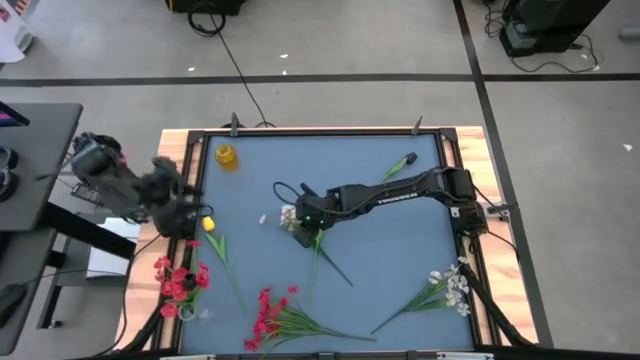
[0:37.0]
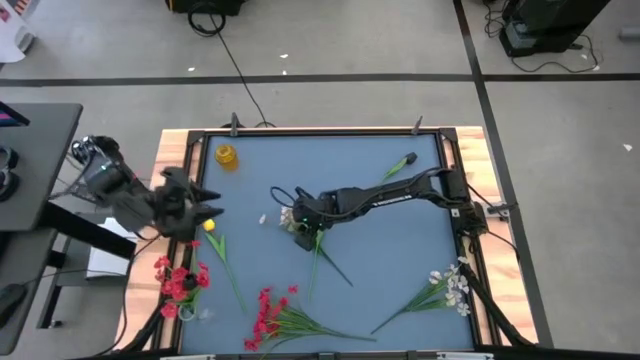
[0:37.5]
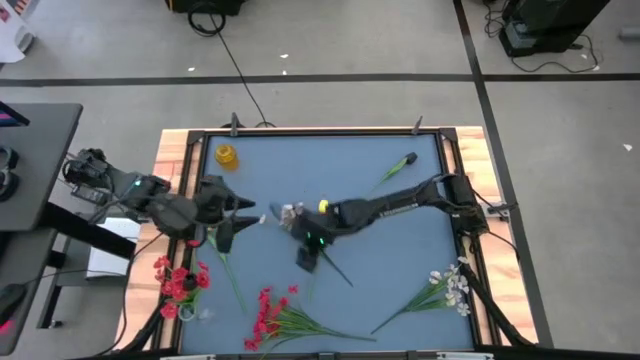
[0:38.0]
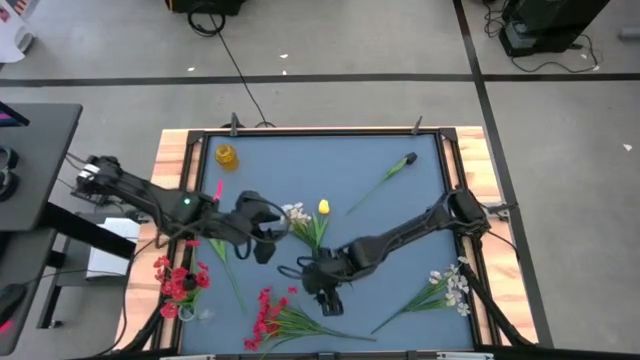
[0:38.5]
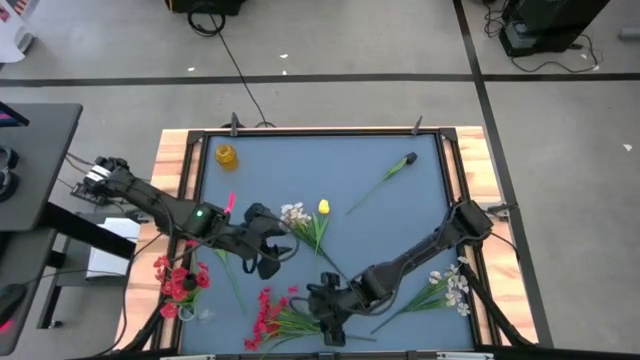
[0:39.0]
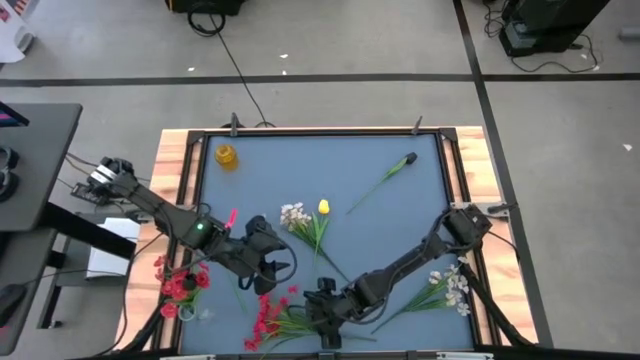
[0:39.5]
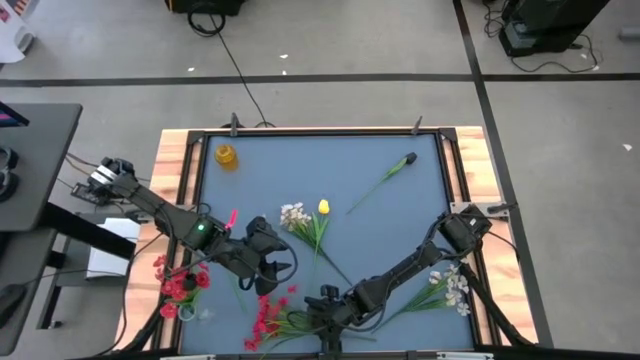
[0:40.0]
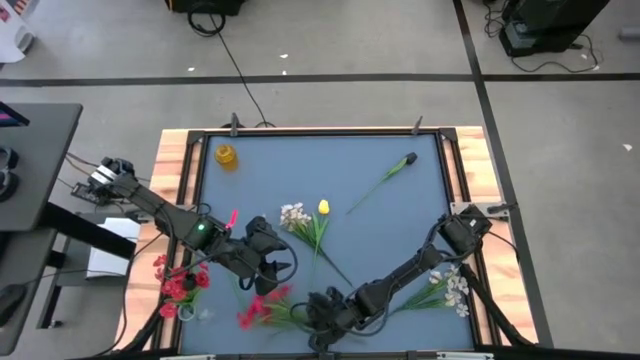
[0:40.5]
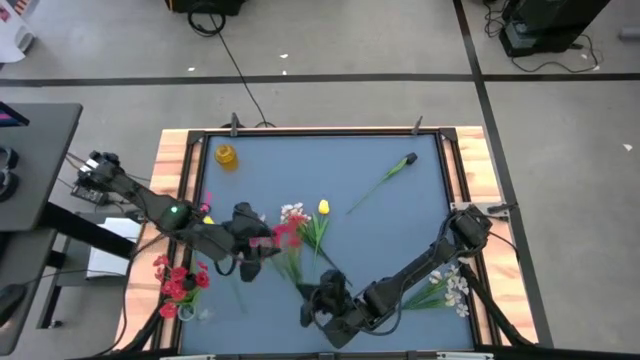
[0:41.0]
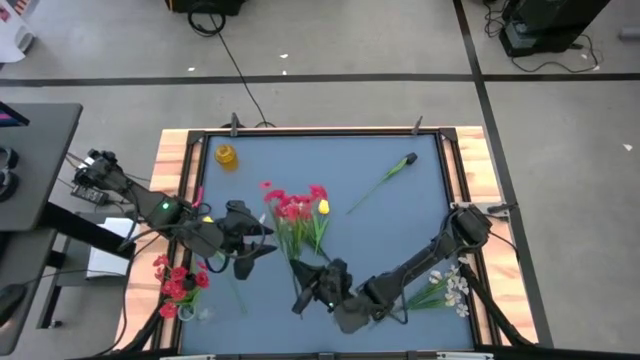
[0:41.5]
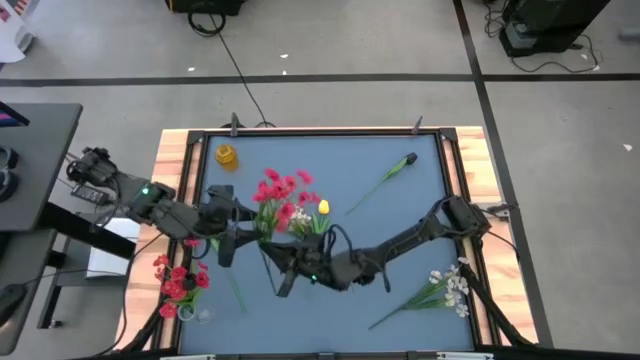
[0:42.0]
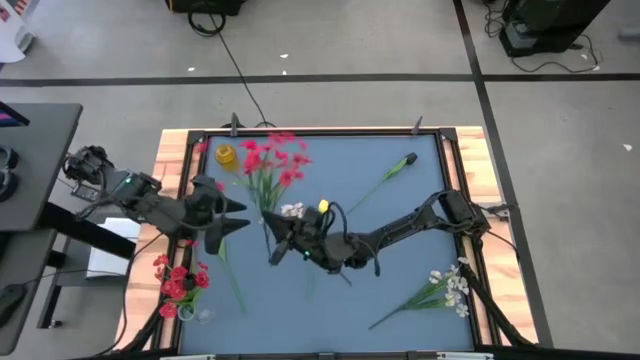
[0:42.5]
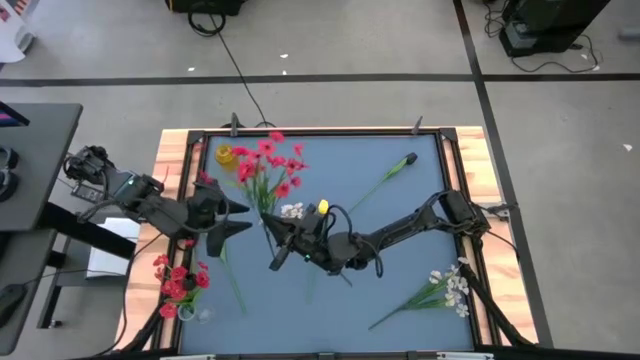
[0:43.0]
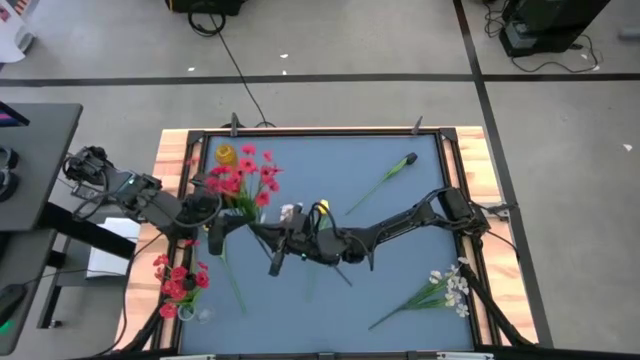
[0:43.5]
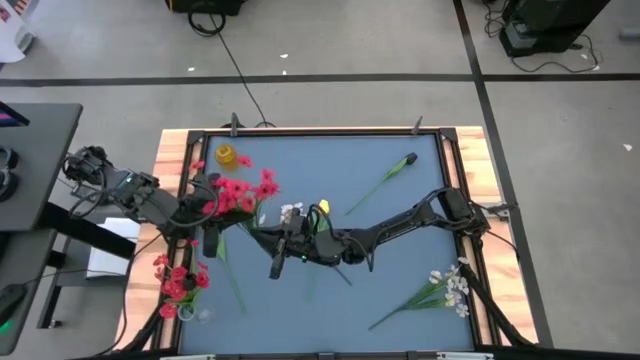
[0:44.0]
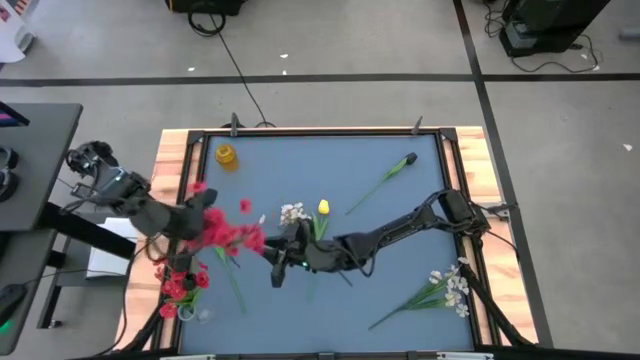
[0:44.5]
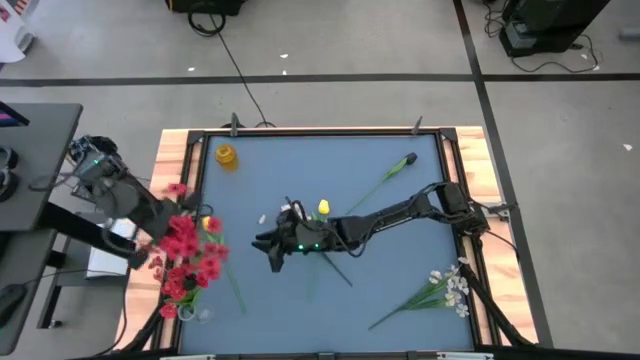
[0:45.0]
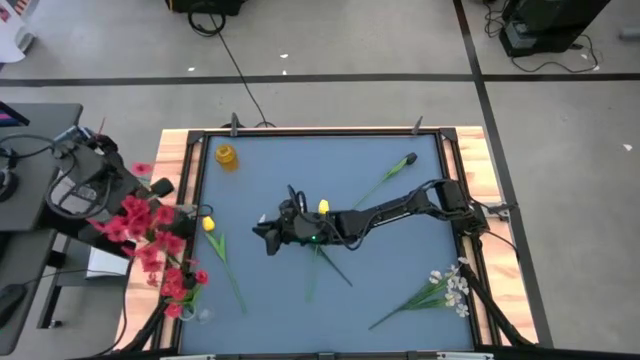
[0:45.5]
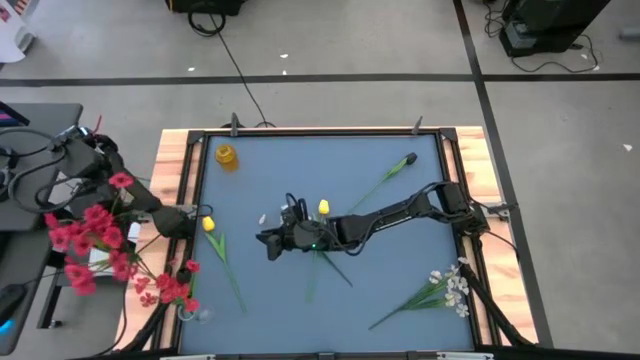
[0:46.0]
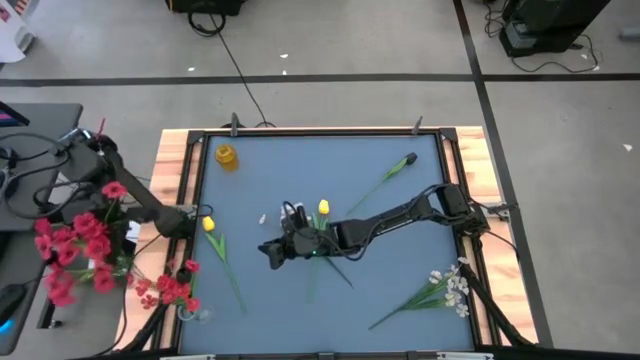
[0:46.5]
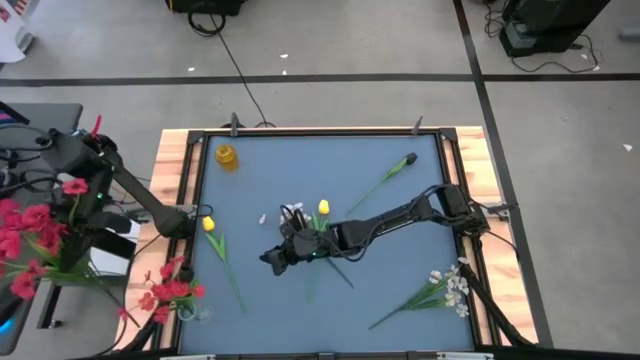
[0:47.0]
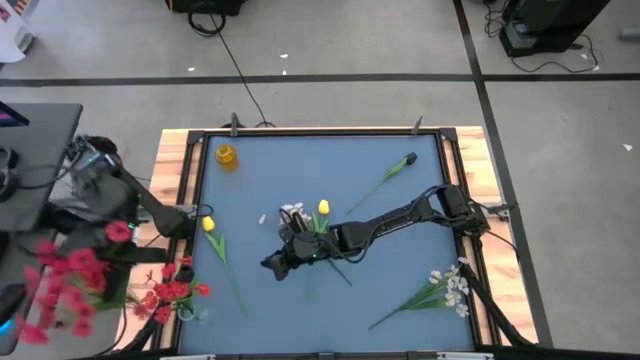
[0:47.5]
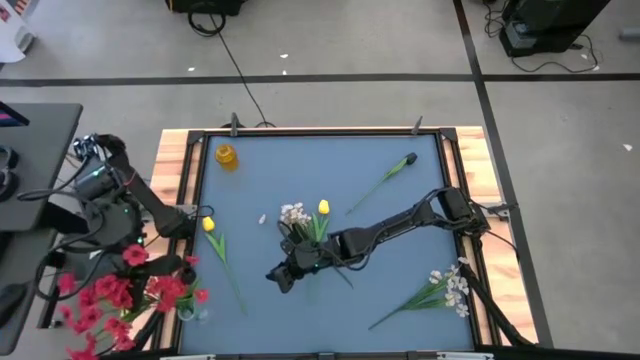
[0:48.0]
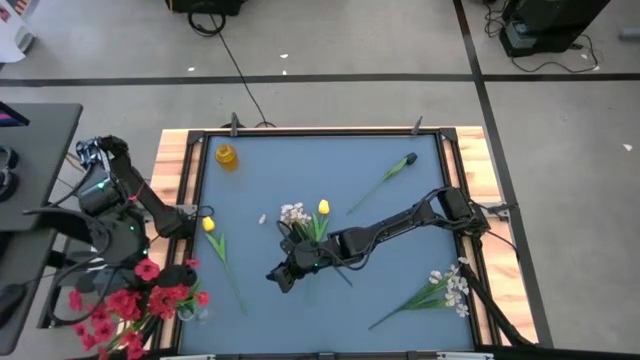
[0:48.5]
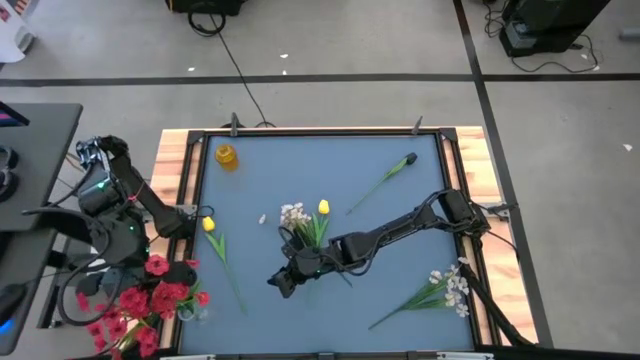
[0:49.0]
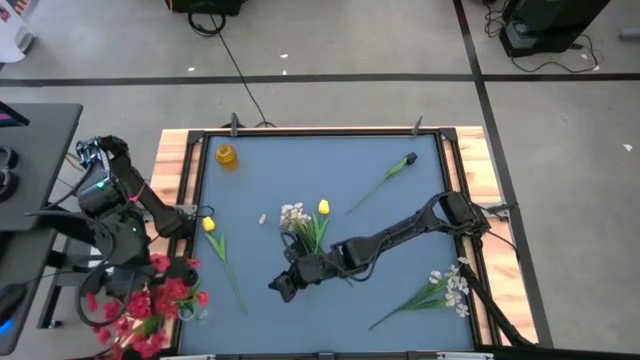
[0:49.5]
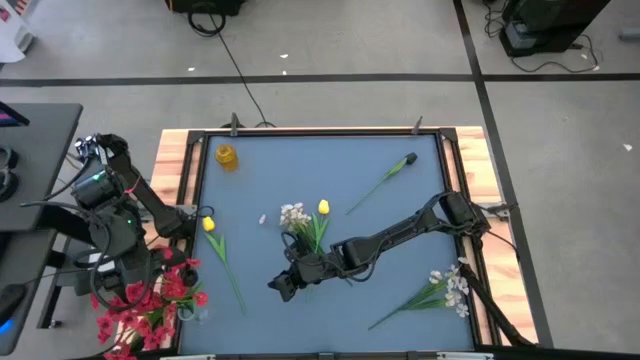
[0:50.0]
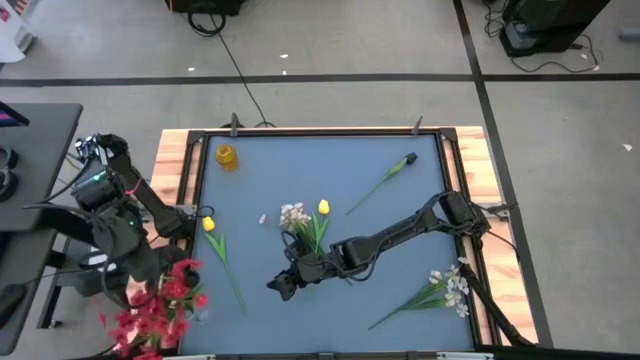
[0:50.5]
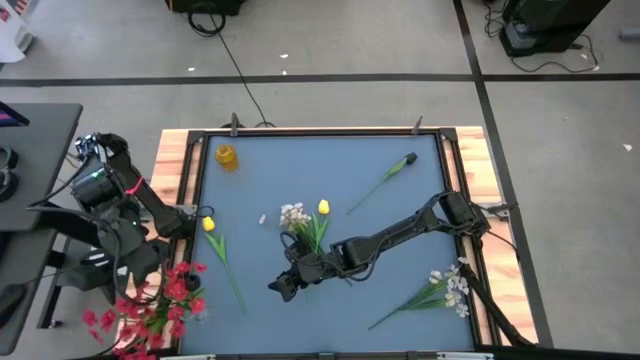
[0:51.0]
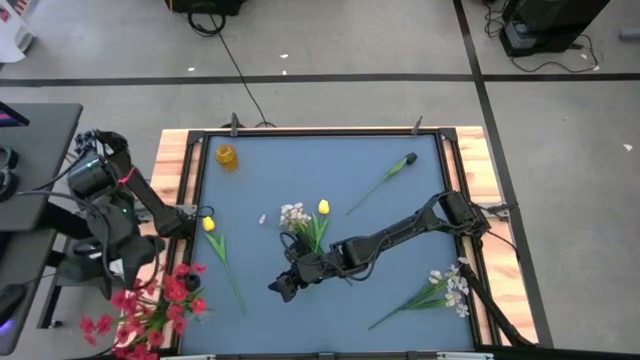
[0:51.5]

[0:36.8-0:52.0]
Task: Sort flowers into vase by color
Put the red flowers into the transparent vase

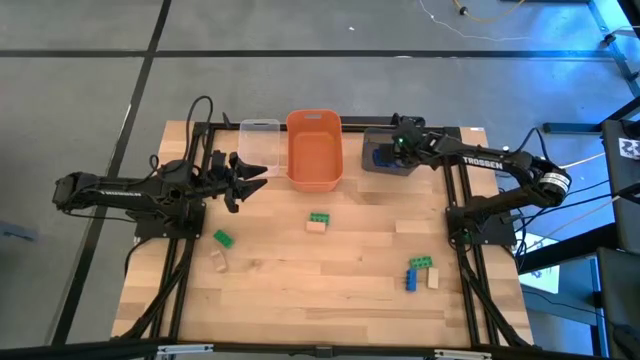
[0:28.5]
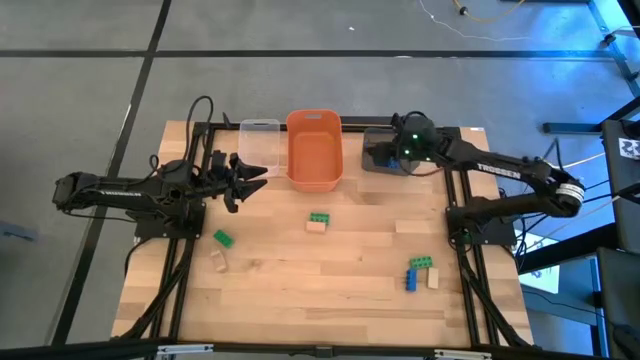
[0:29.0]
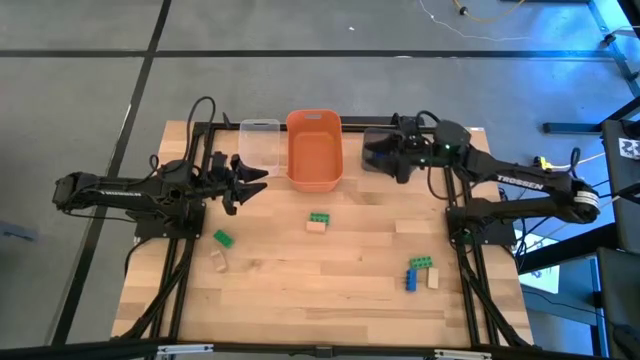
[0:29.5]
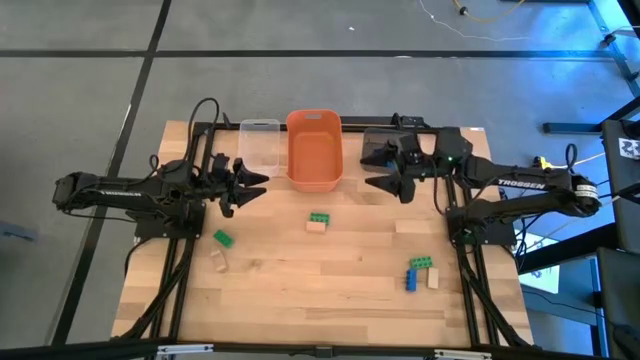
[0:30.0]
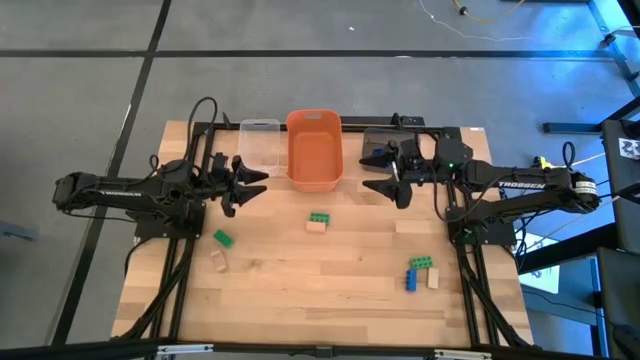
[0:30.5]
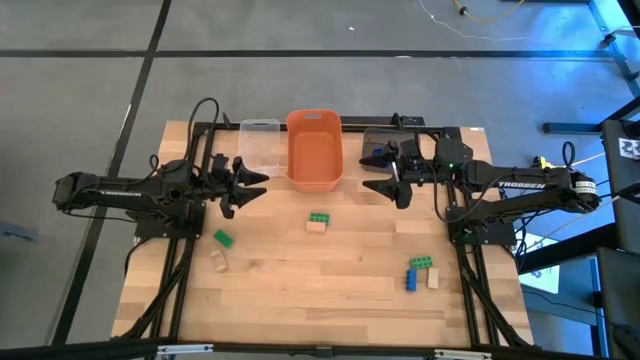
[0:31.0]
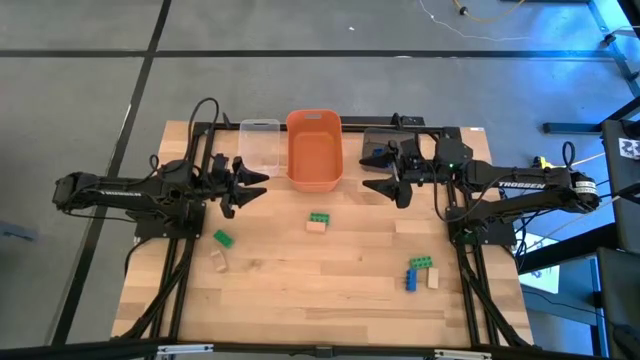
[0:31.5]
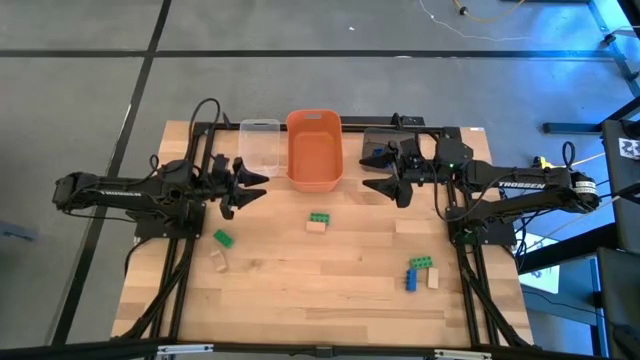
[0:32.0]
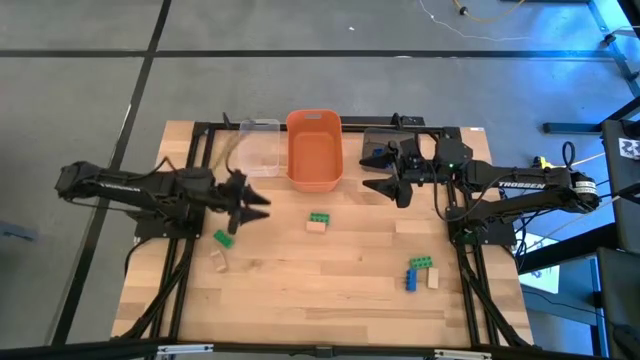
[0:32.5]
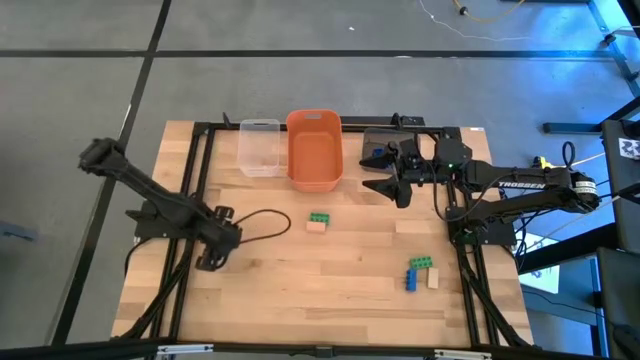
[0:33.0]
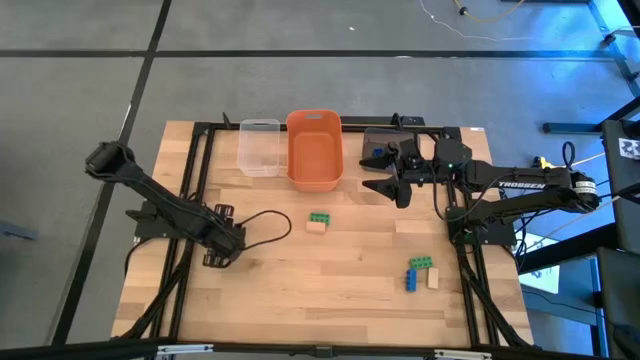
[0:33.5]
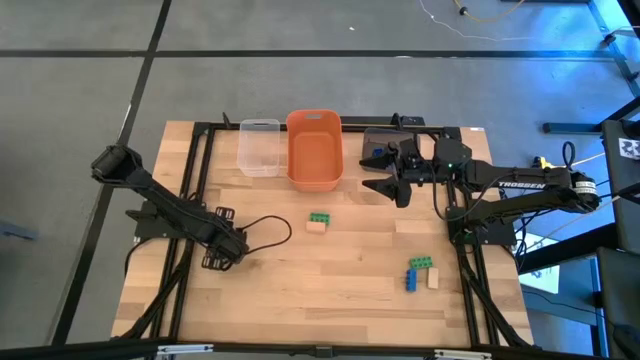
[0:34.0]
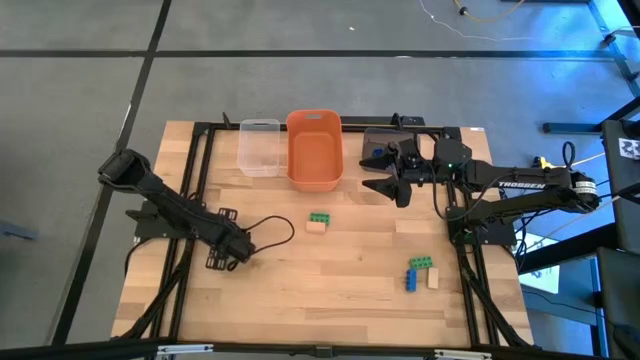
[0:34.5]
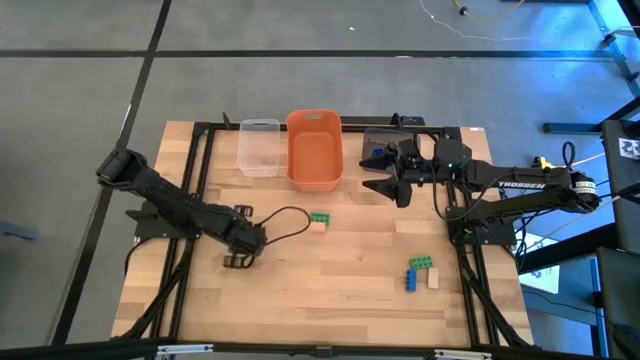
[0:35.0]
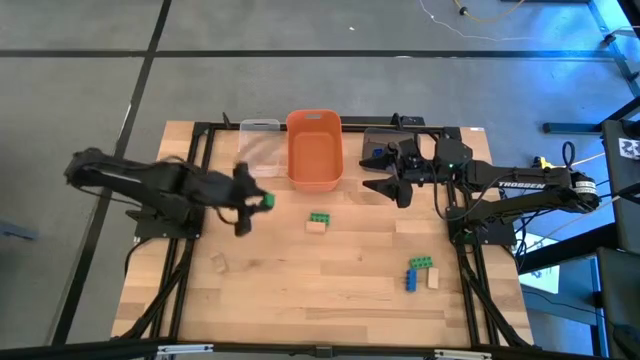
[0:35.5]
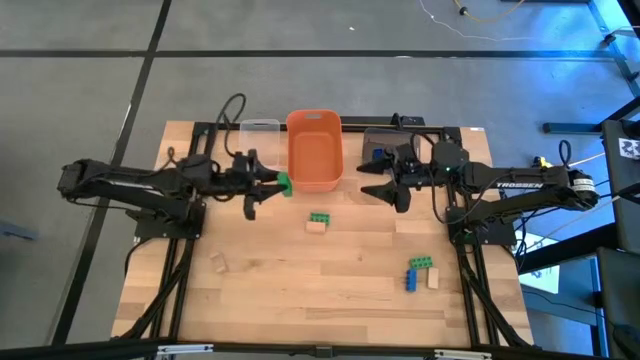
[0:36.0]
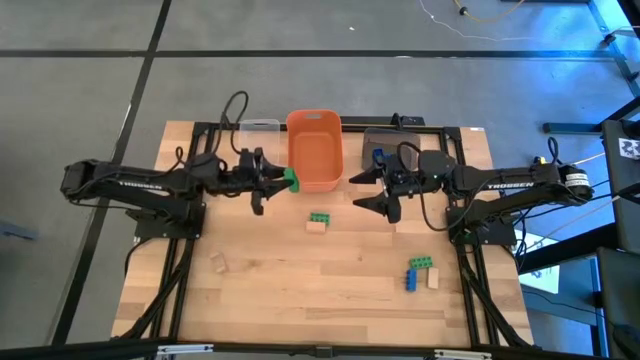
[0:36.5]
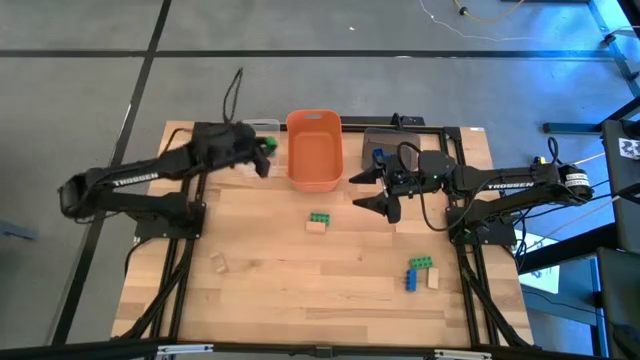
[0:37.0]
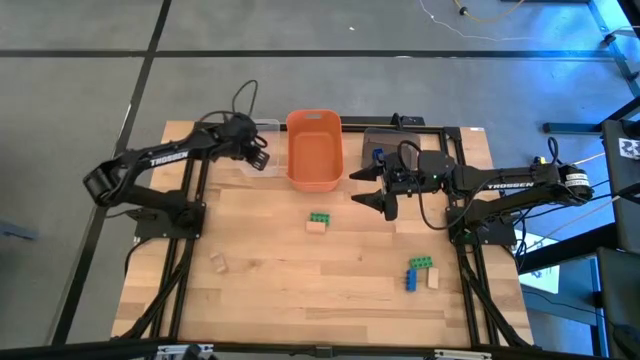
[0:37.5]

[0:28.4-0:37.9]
Task: Sort & place blocks by color
Put the middle green game piece into the transparent bin
